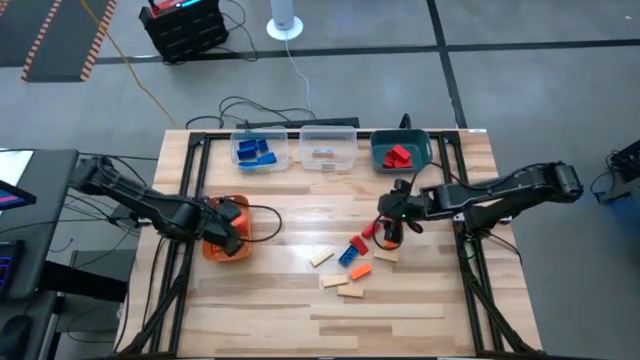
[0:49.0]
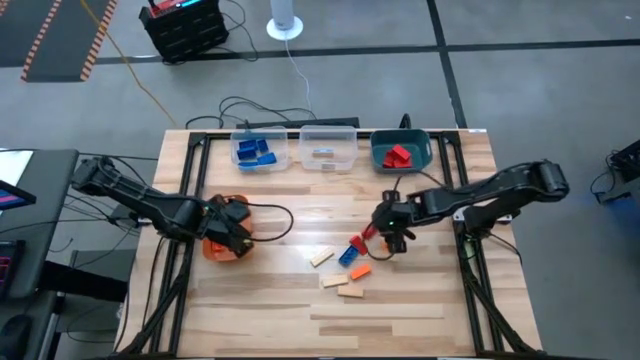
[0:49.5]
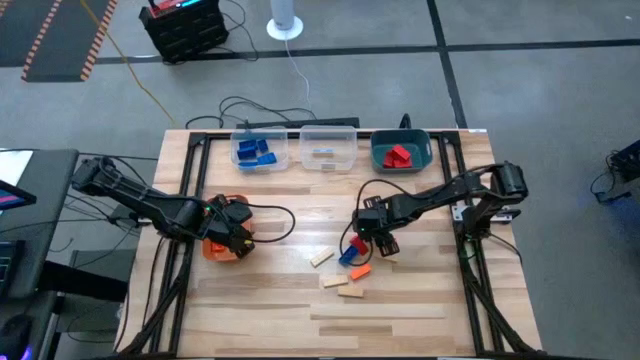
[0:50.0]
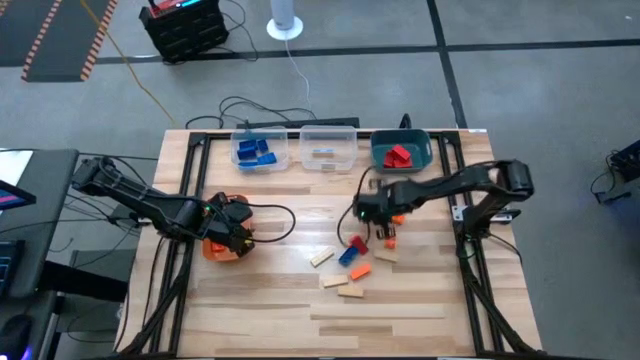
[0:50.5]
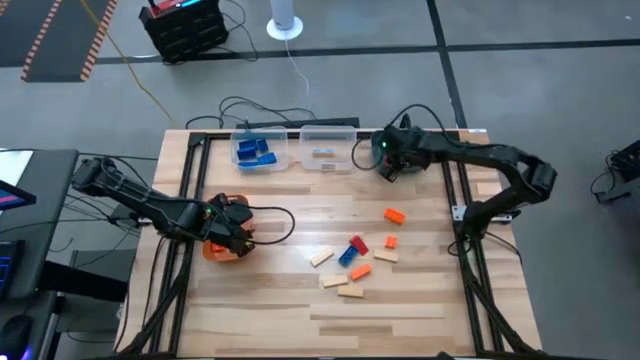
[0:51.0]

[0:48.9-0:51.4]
Task: Sort blocks
Put the red block into the blue bin

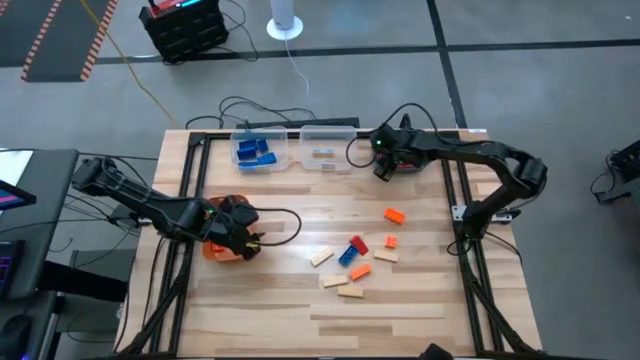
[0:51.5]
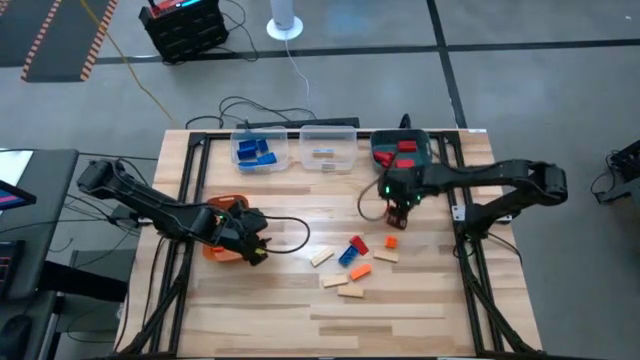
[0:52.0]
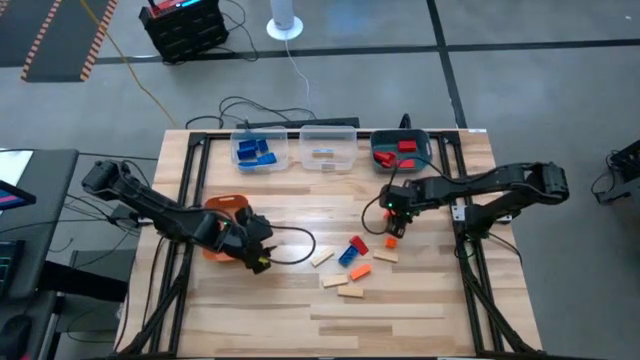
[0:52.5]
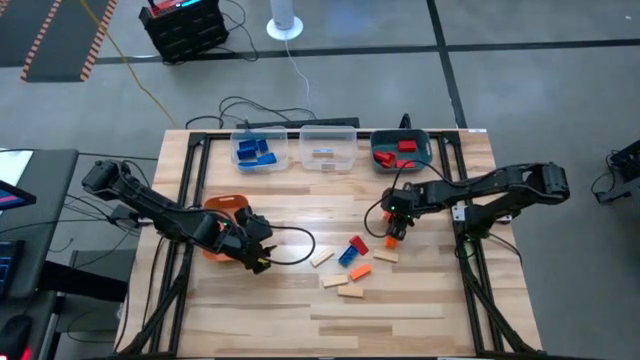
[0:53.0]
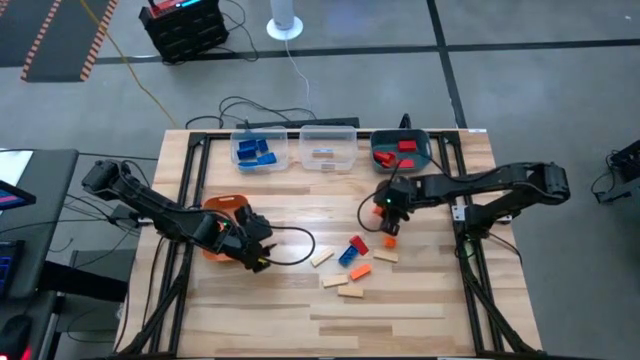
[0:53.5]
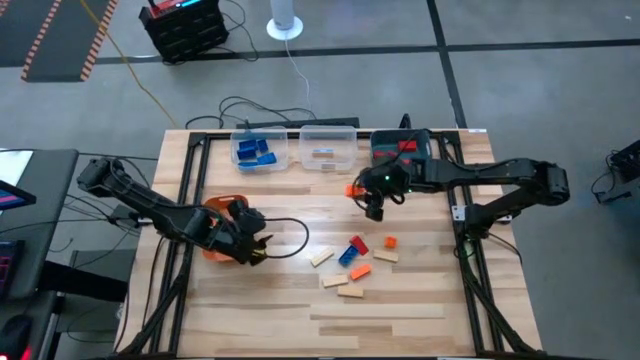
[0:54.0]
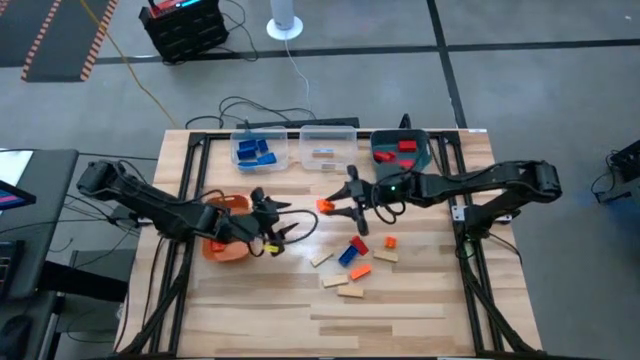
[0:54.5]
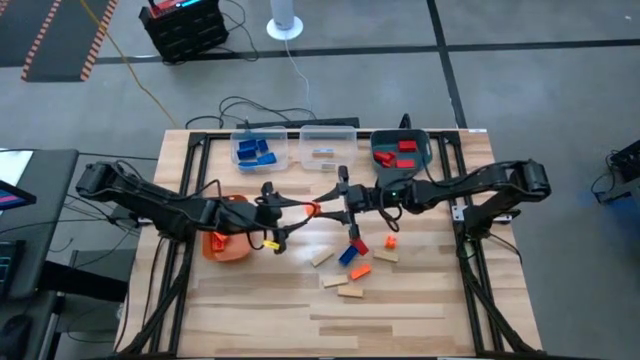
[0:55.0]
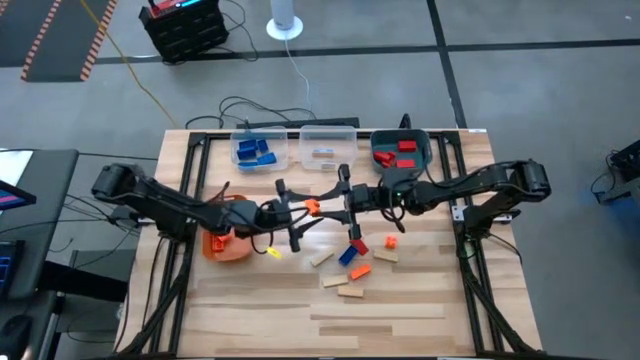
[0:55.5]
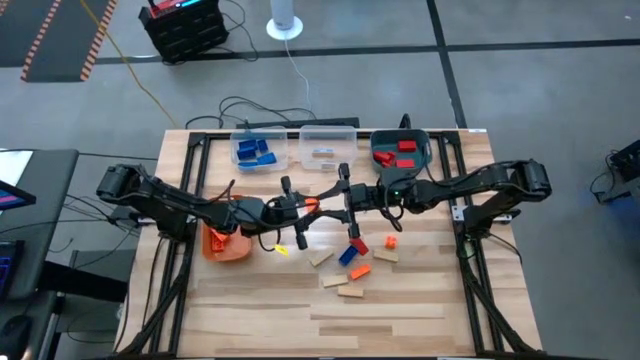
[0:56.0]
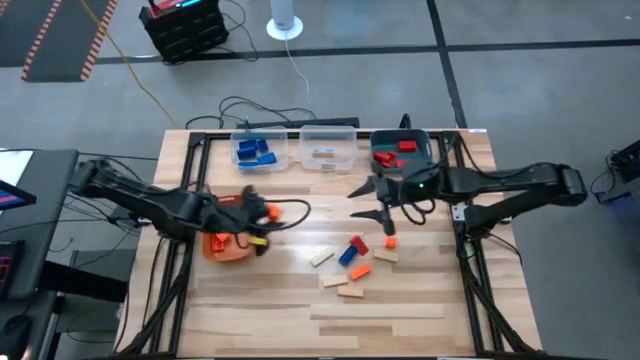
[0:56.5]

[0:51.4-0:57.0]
Put the orange game piece into the orange bin

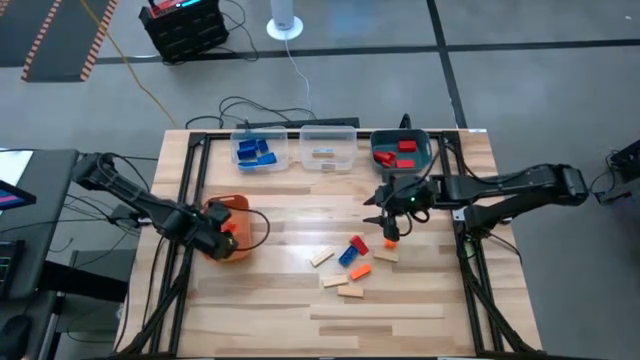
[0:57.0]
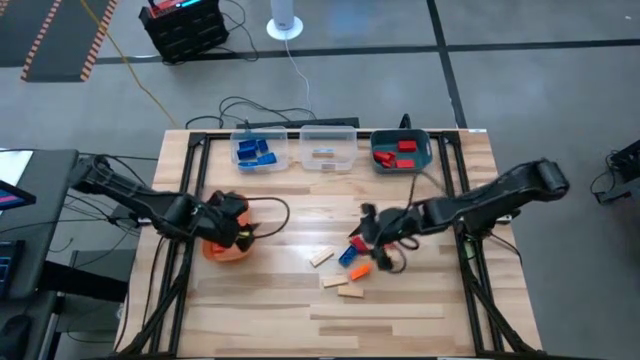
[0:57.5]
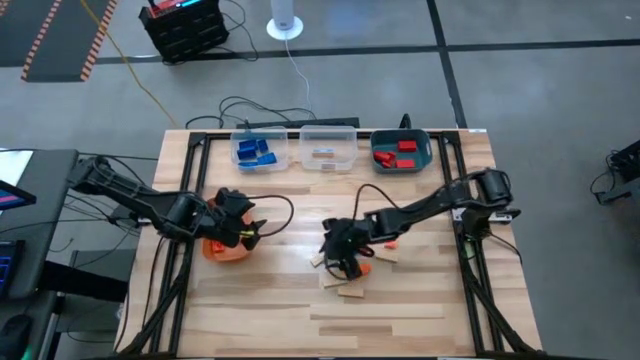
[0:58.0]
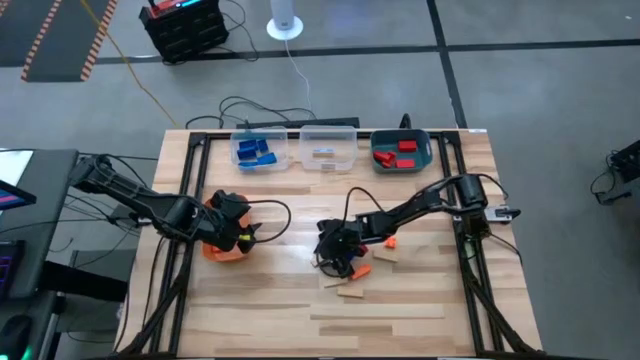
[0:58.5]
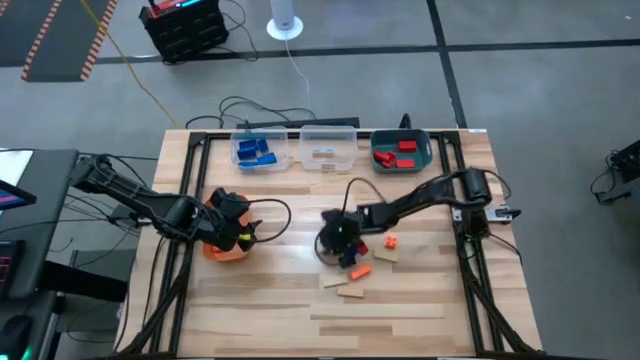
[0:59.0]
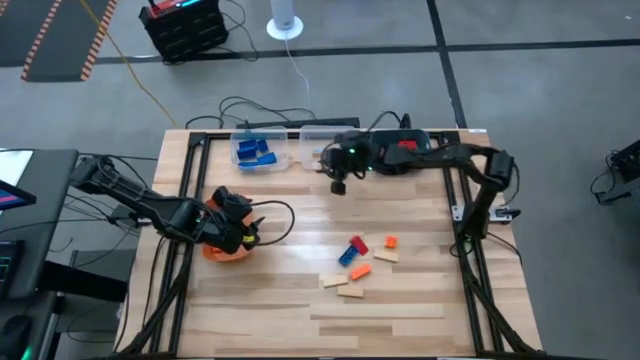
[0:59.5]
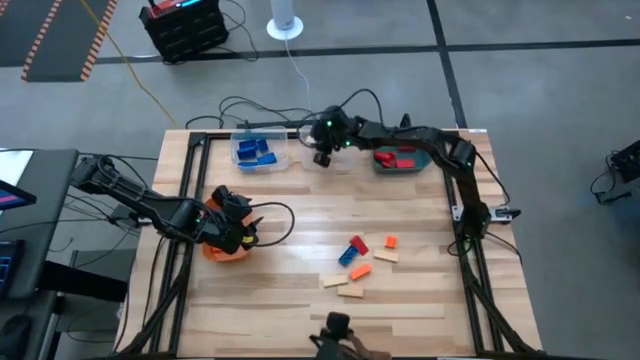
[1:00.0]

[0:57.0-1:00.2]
Put the light brown block into the right transparent bin

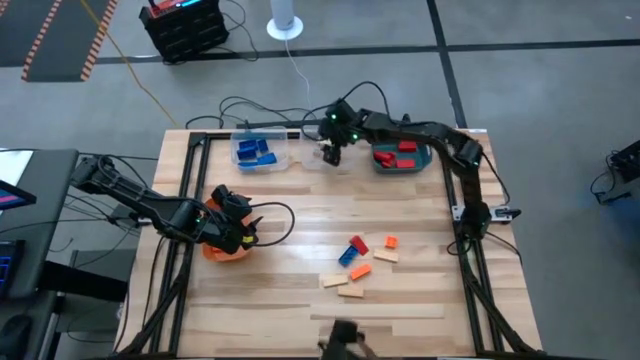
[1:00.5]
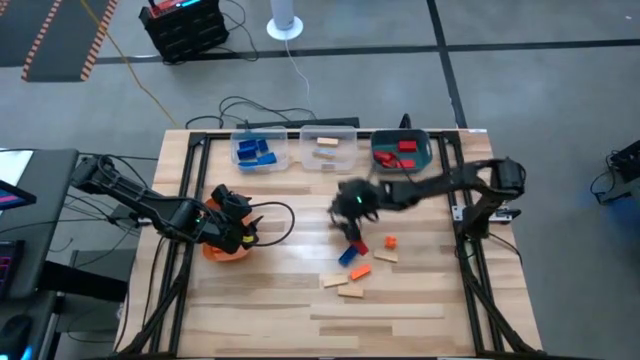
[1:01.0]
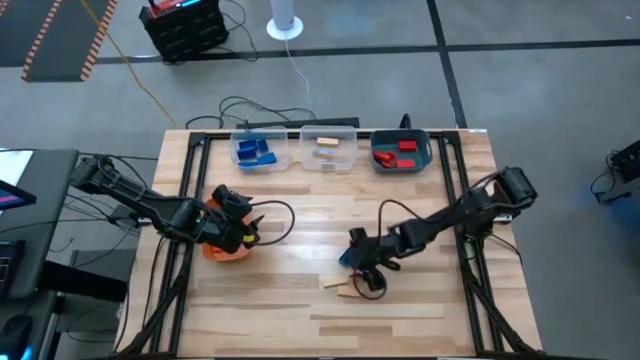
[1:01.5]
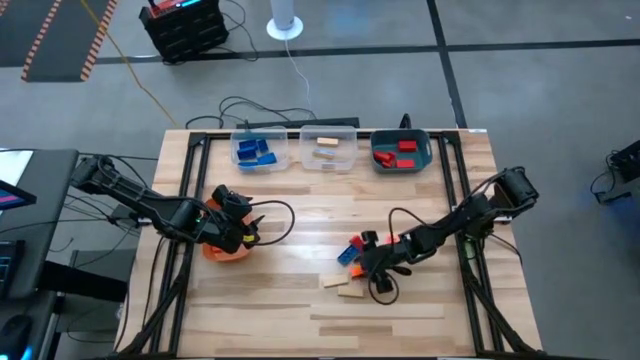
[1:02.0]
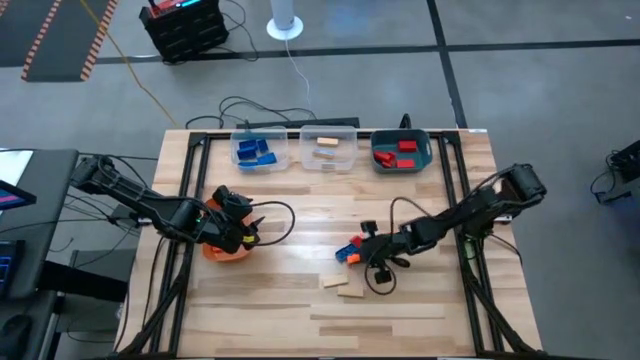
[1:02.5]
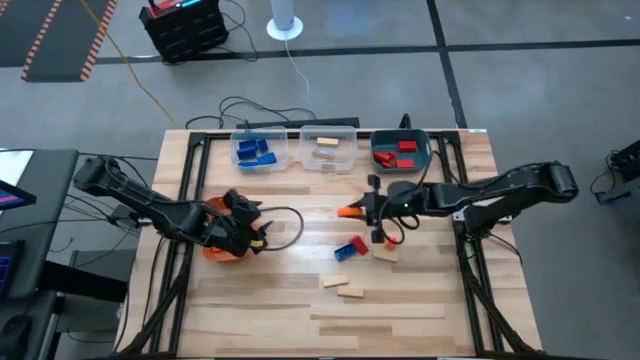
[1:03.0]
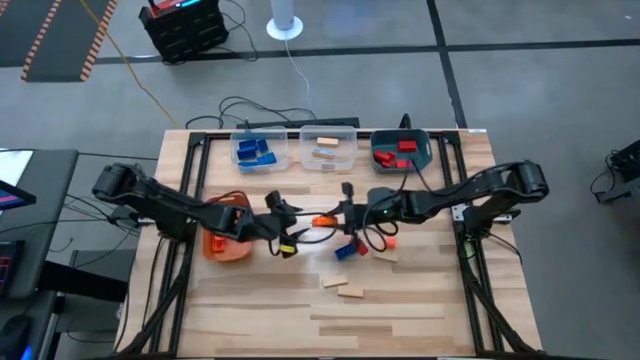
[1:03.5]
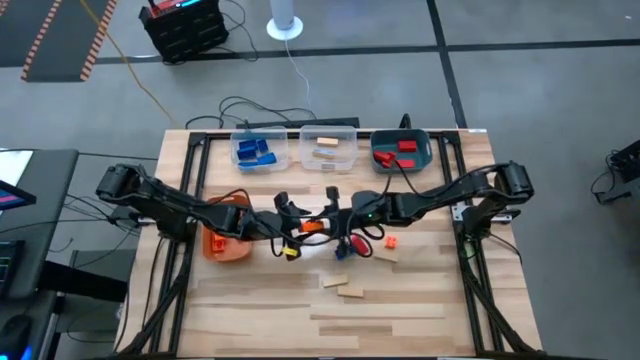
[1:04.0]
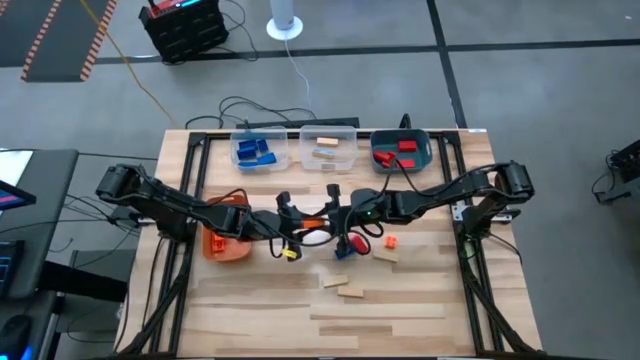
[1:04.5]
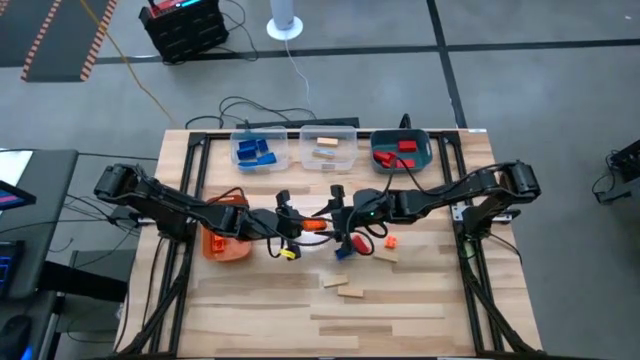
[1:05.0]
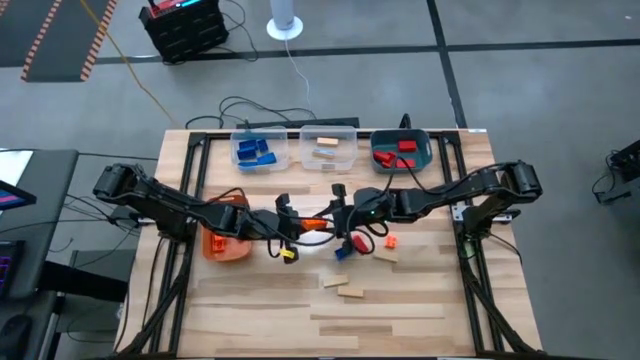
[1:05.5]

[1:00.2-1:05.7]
Put the orange game piece into the orange bin

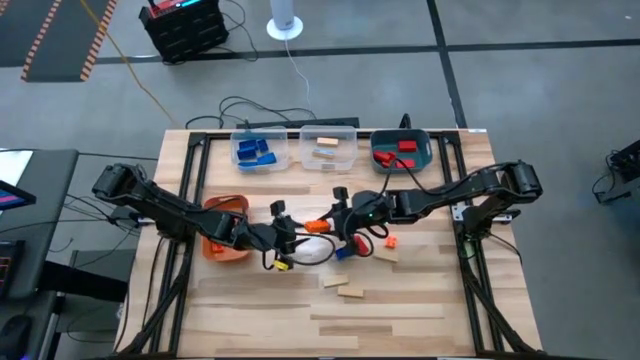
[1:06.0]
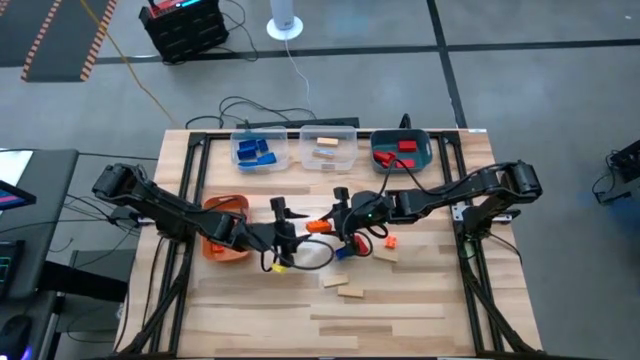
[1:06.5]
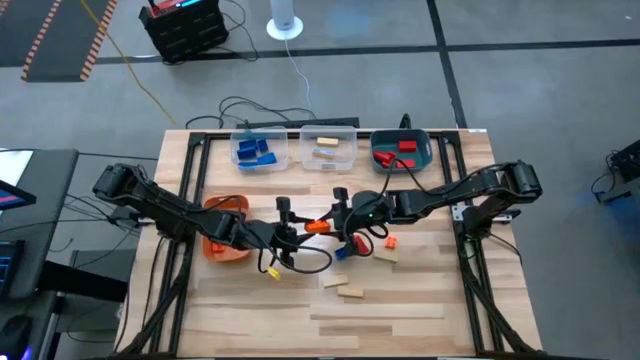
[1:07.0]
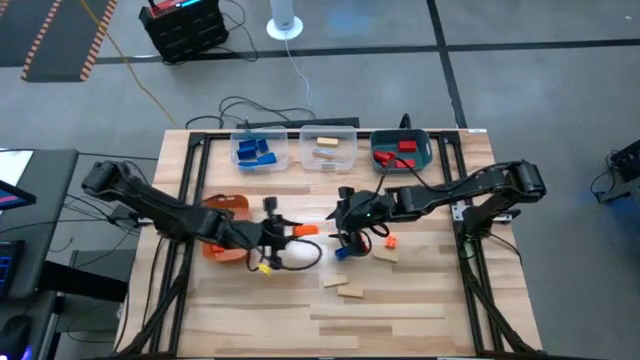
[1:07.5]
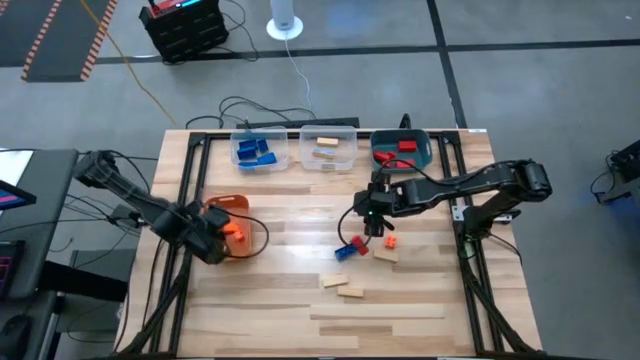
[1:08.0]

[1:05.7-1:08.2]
Put the orange game piece into the orange bin

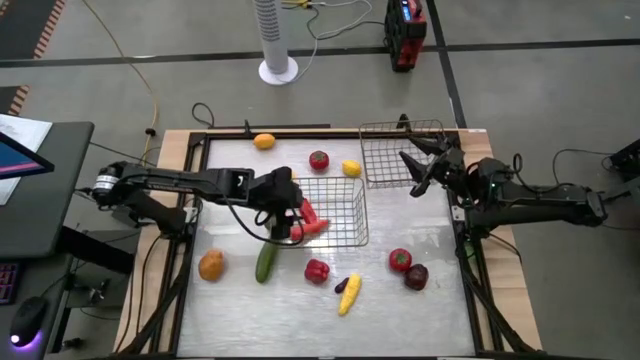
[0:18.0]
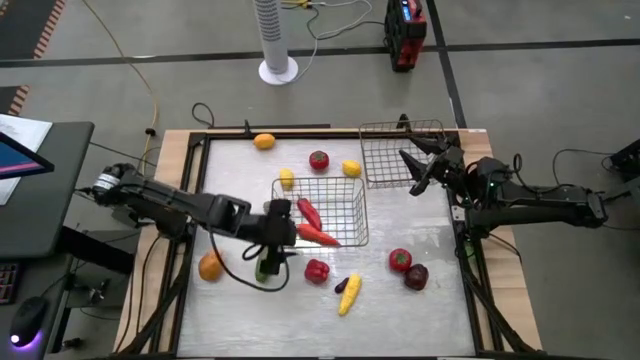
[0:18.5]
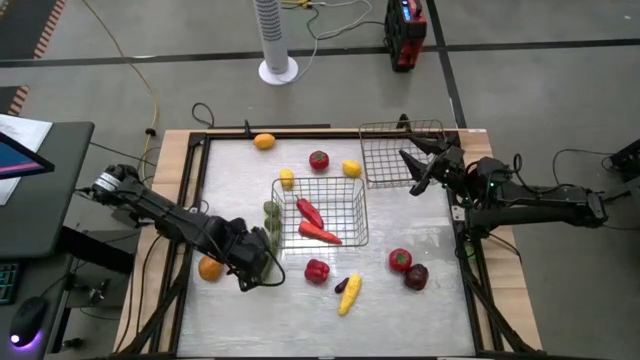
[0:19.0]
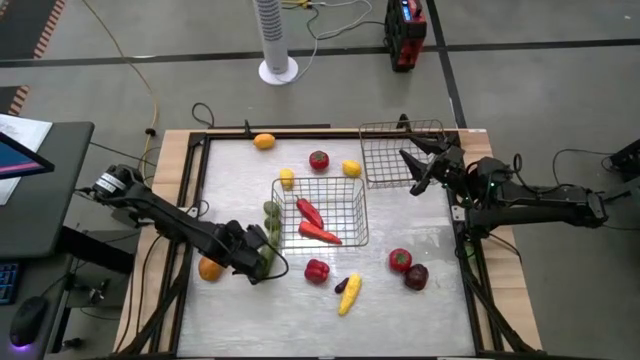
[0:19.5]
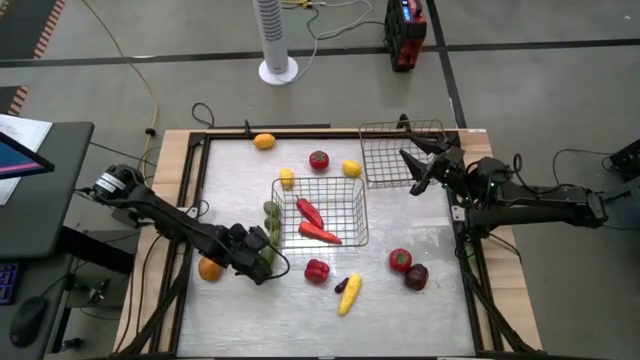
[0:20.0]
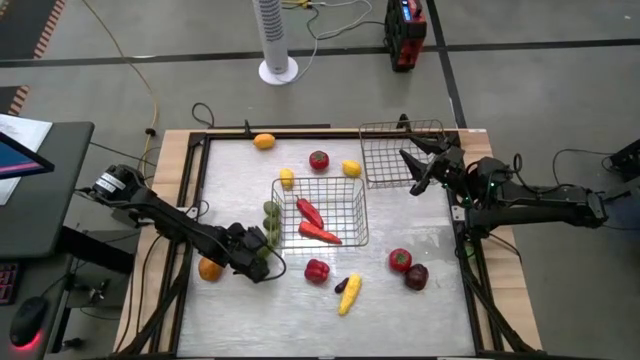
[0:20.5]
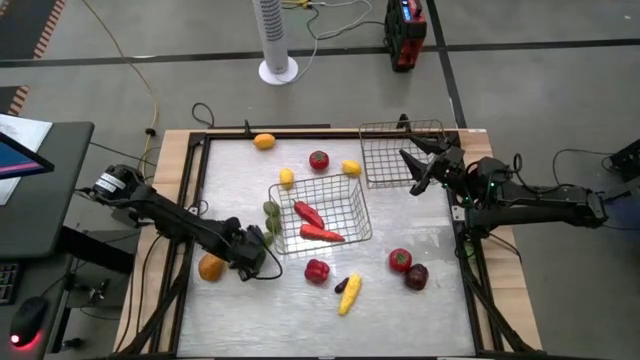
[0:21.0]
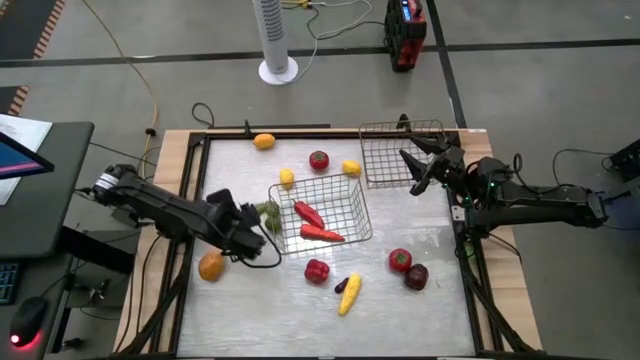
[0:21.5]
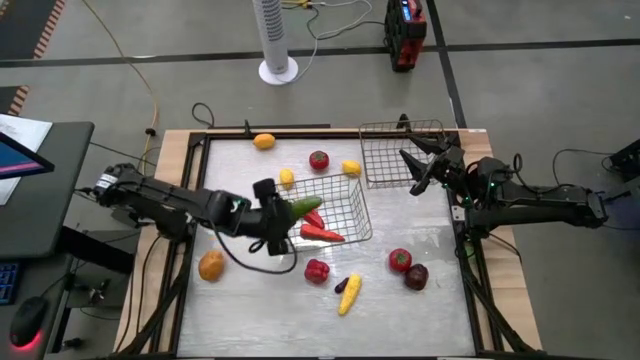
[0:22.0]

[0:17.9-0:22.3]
Task: Sort produce into baskets
Put the green cucumber into the left wire basket
